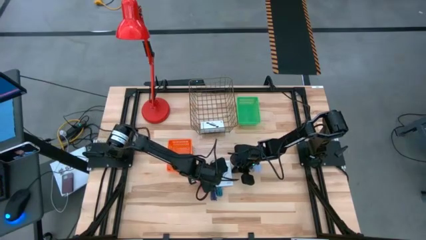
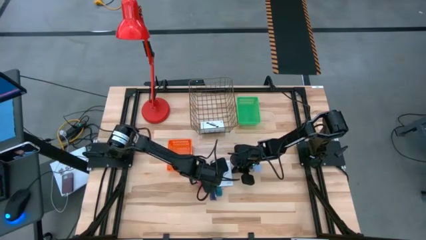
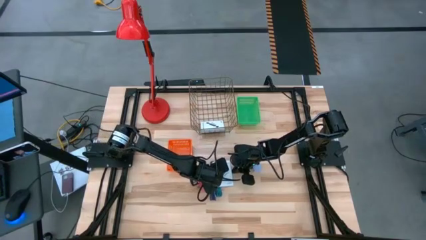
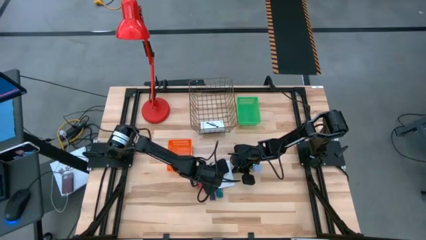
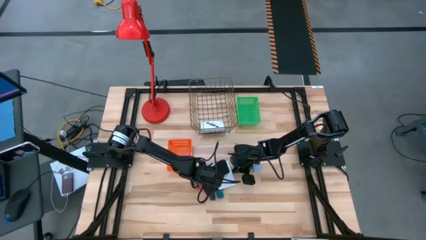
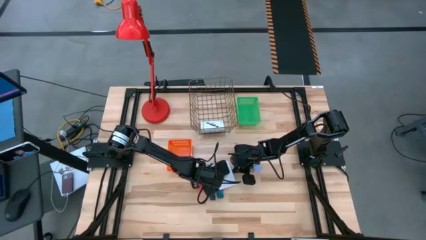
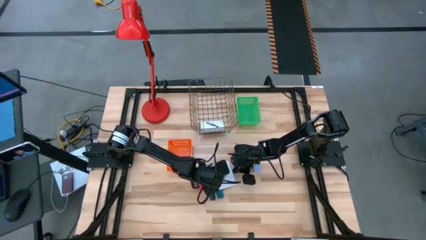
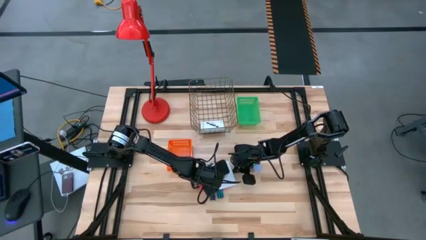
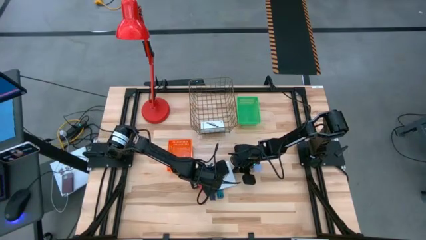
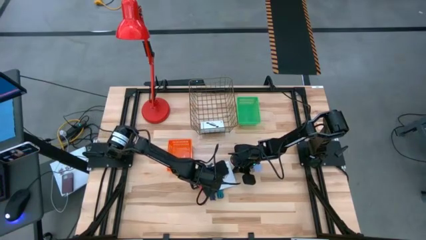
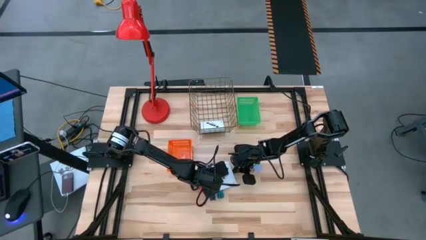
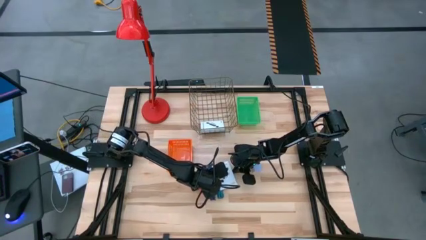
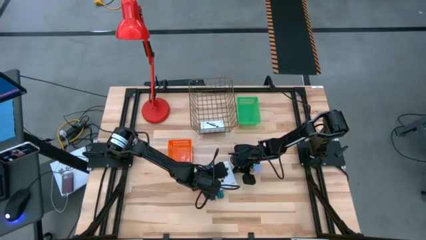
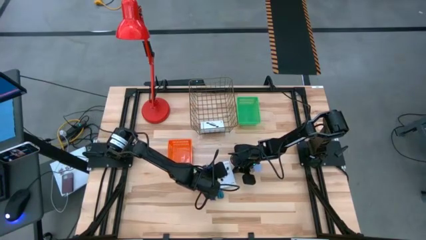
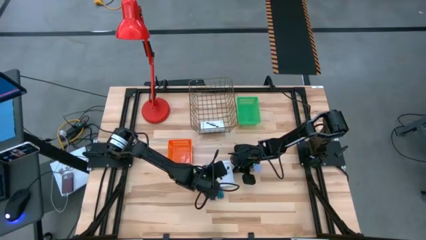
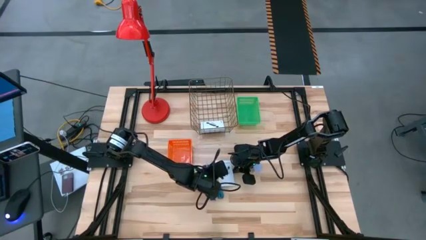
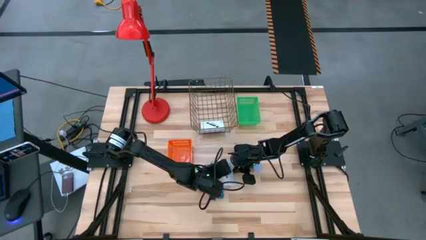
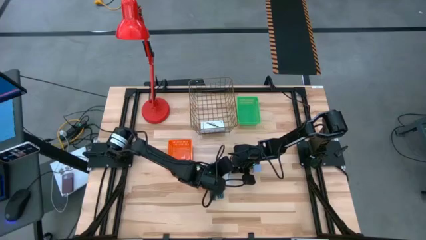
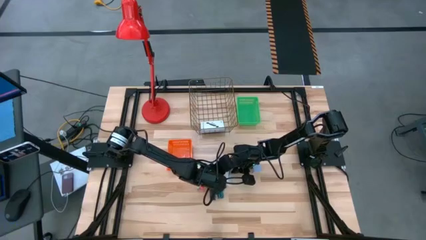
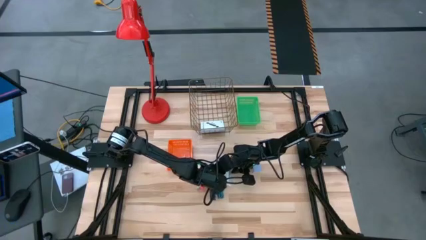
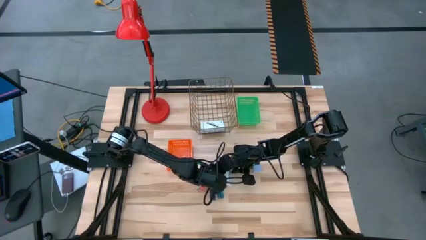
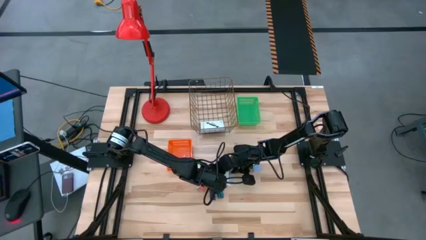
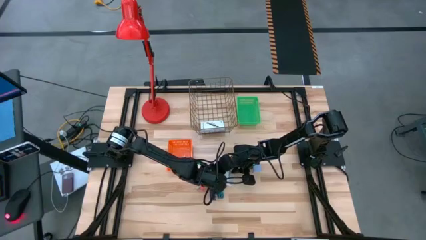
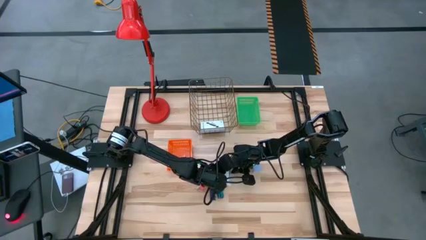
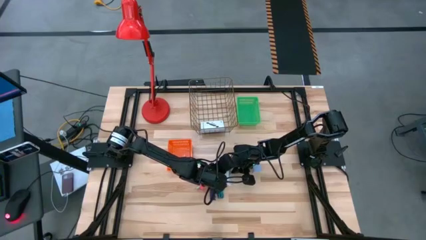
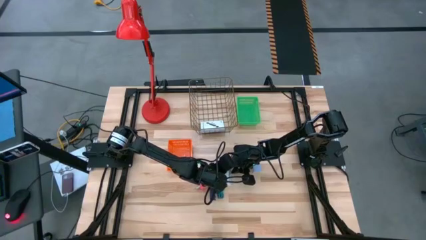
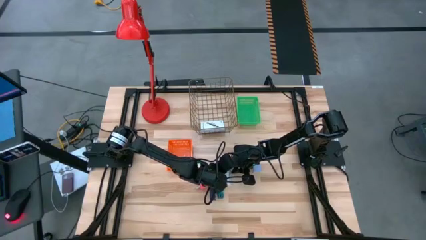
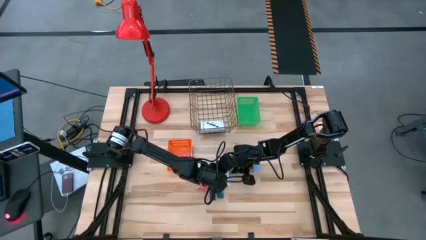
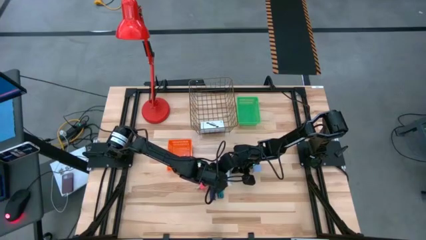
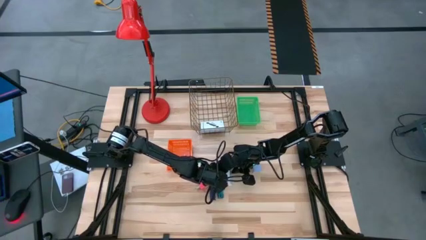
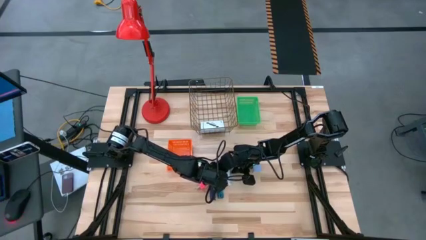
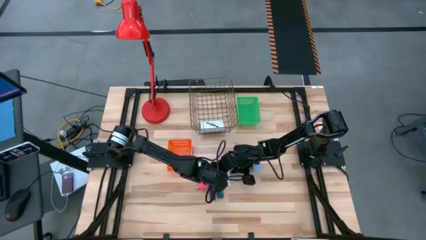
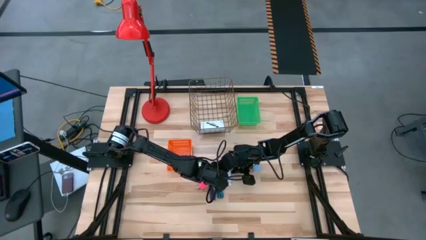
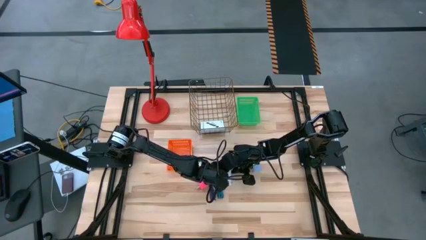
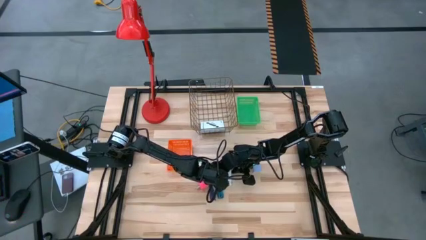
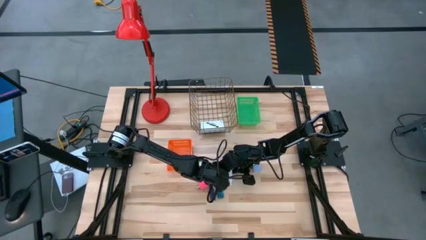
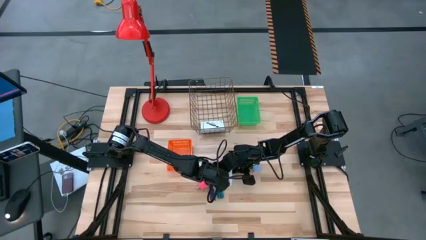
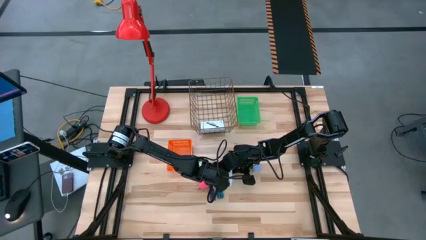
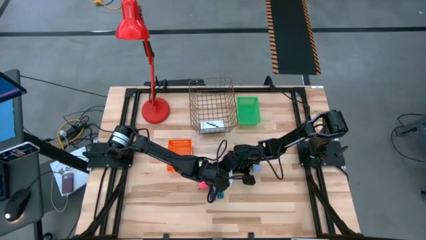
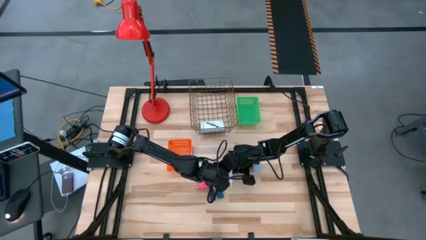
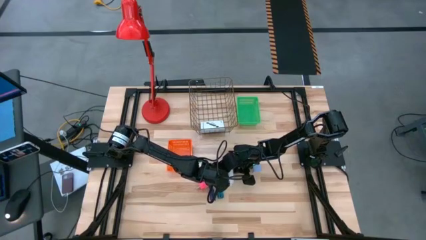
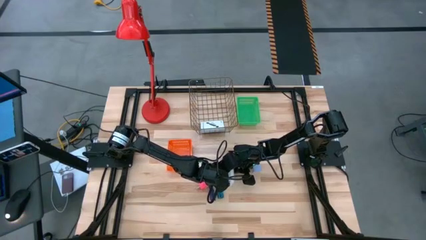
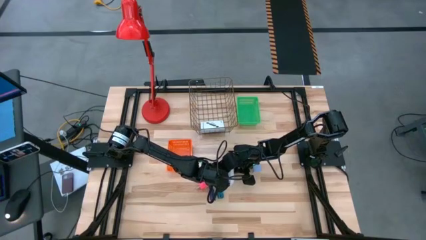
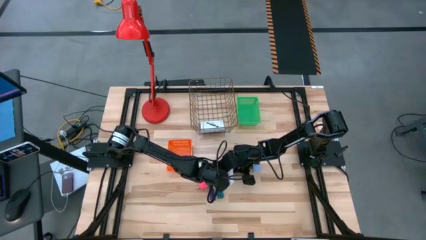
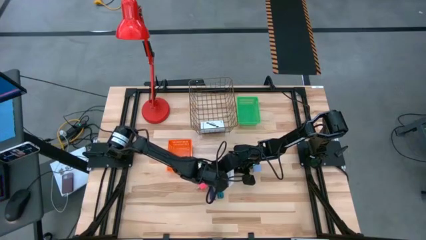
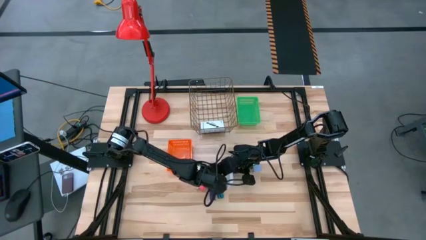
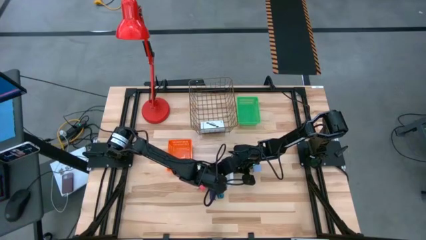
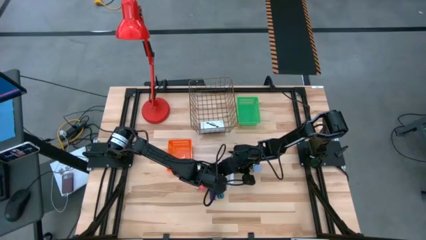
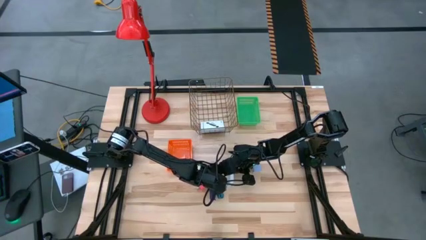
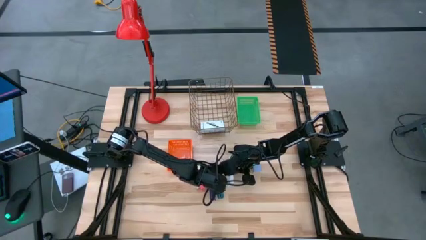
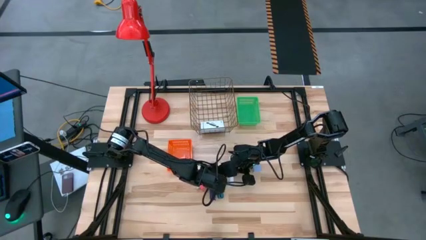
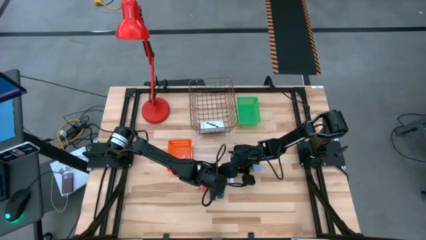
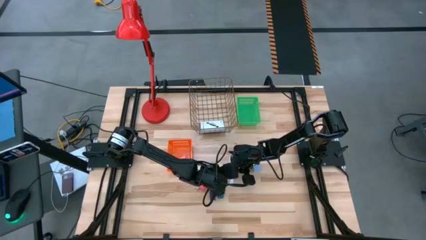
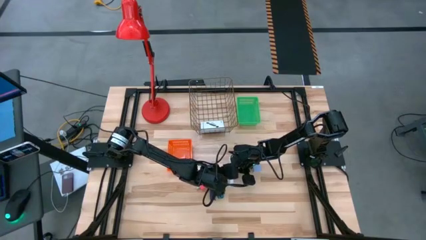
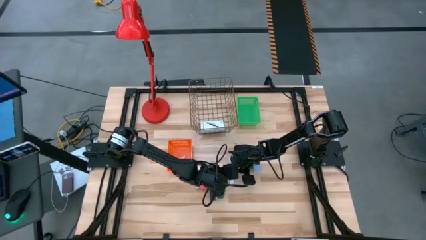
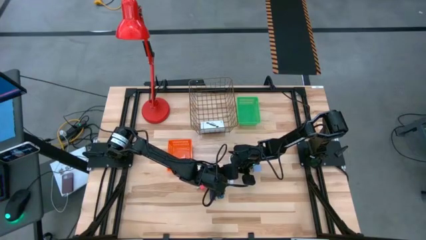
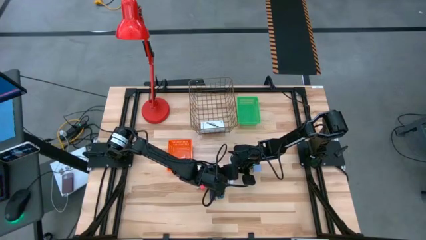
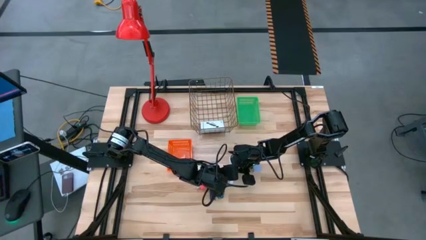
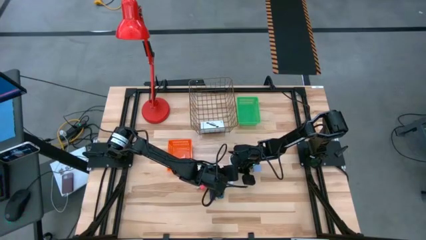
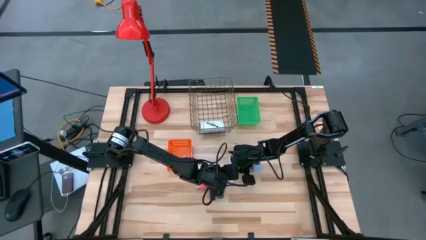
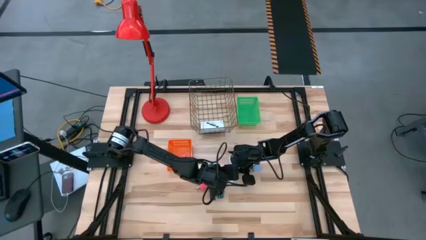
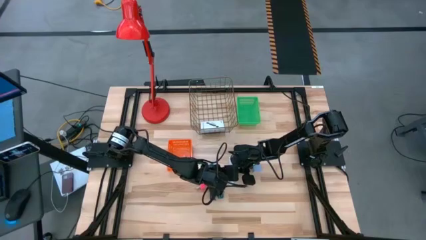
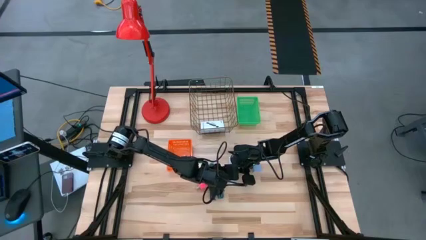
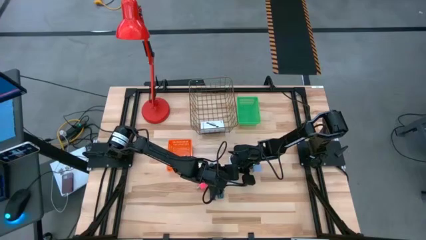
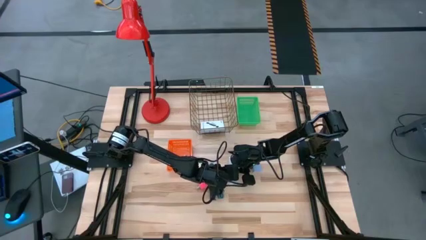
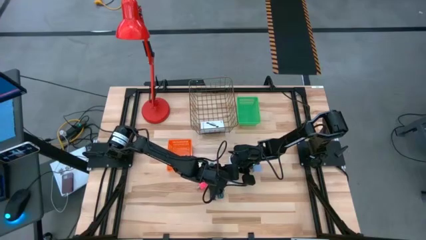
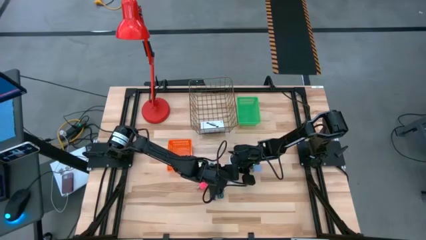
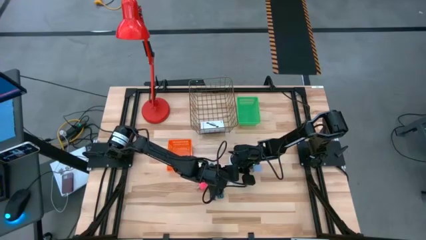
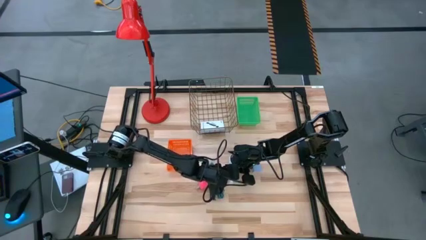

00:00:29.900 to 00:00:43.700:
Task: Pick and place items into bin
Put the card reader box into the wire basket
